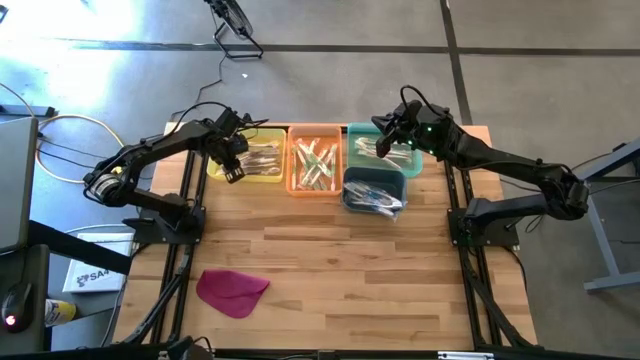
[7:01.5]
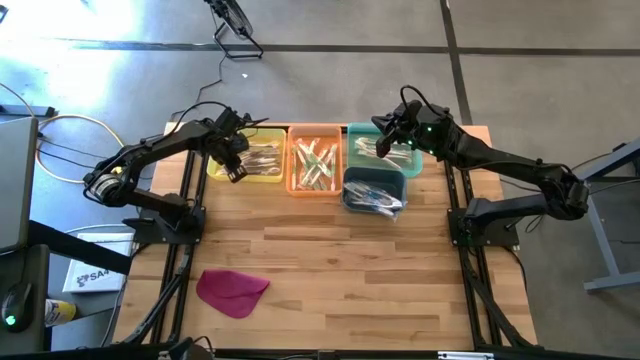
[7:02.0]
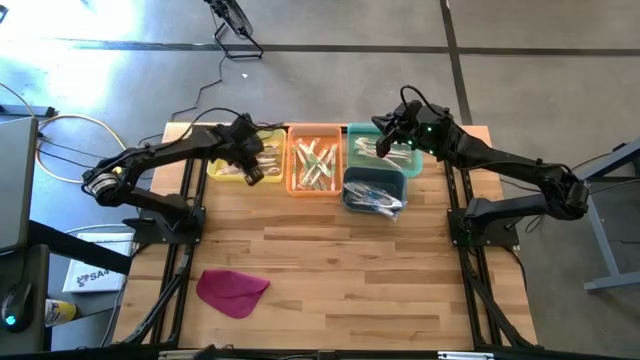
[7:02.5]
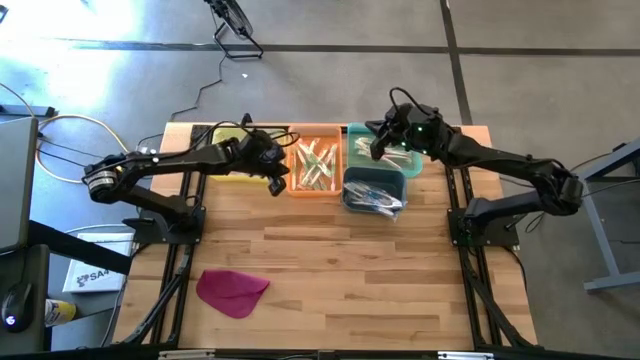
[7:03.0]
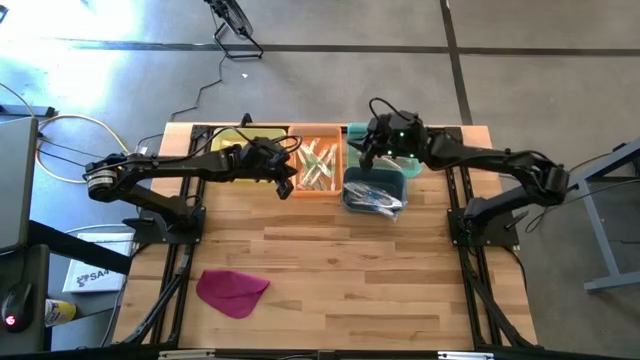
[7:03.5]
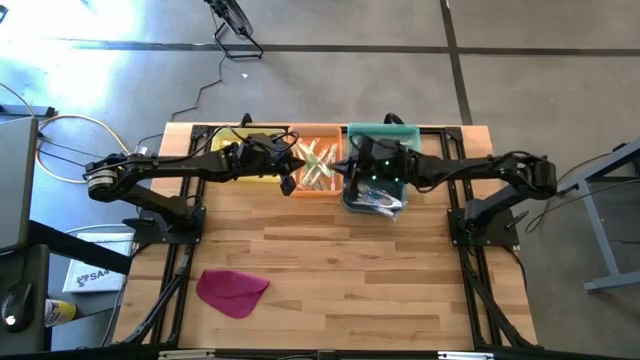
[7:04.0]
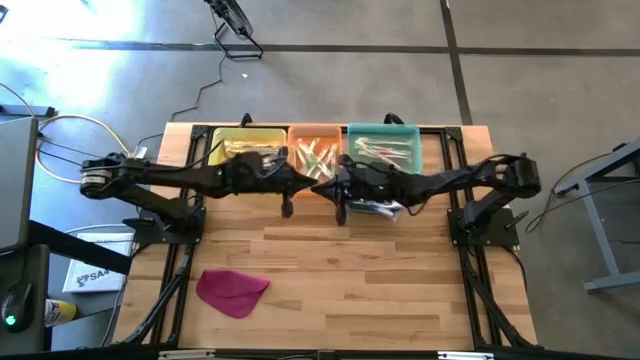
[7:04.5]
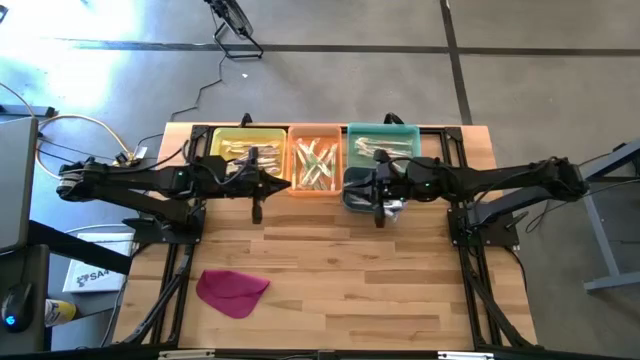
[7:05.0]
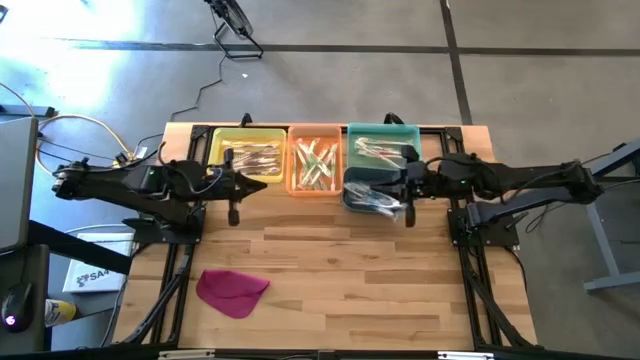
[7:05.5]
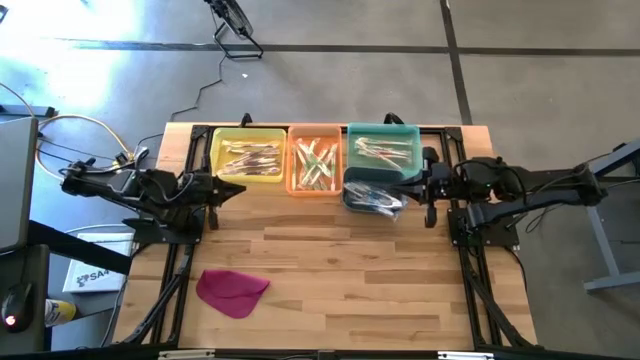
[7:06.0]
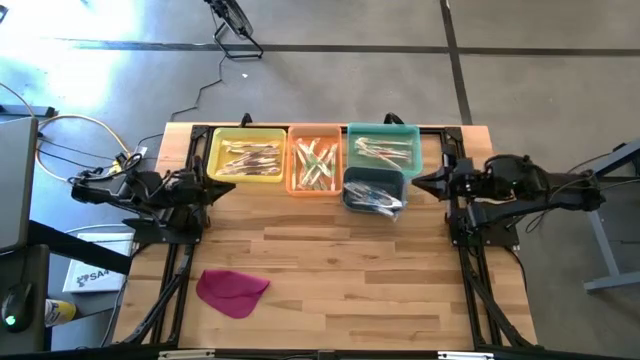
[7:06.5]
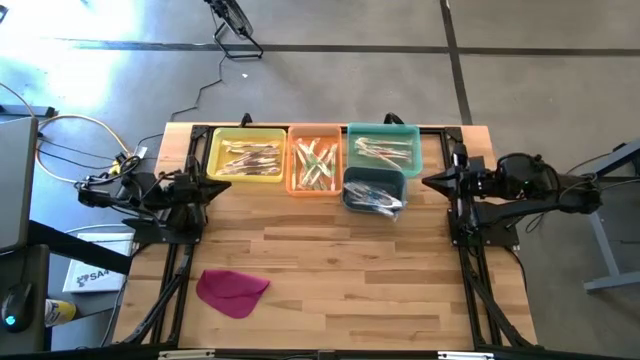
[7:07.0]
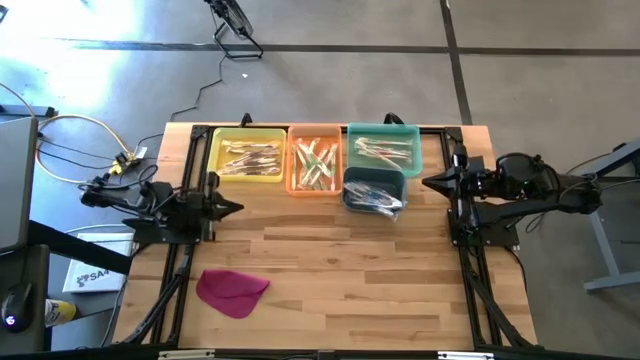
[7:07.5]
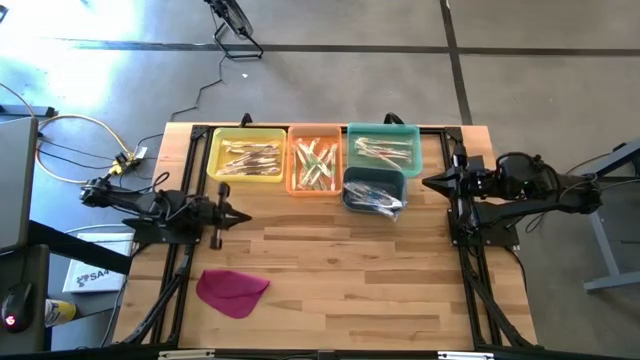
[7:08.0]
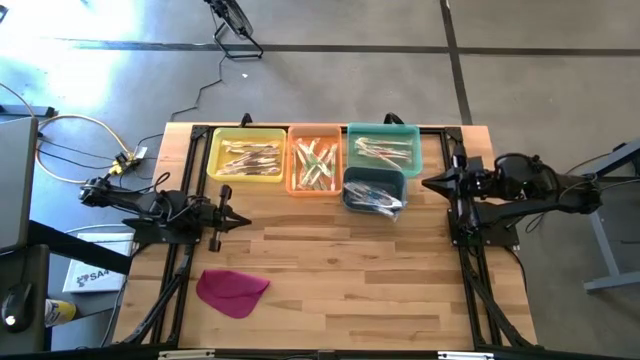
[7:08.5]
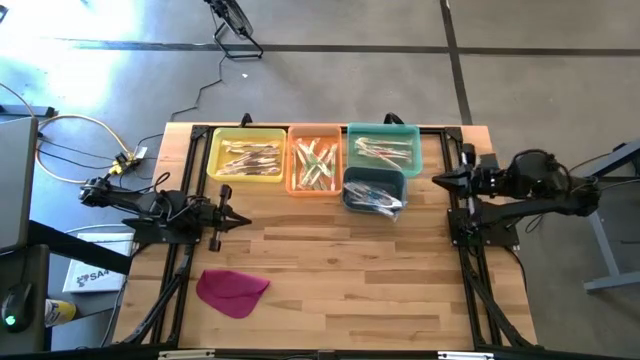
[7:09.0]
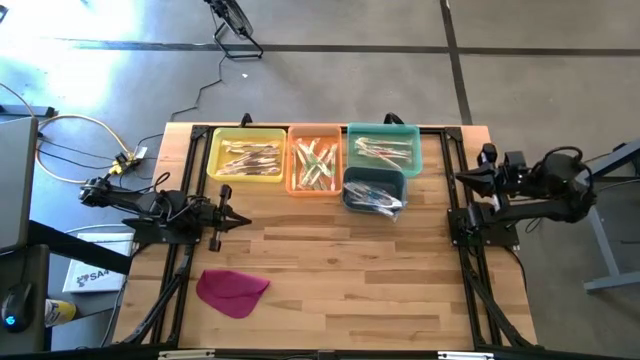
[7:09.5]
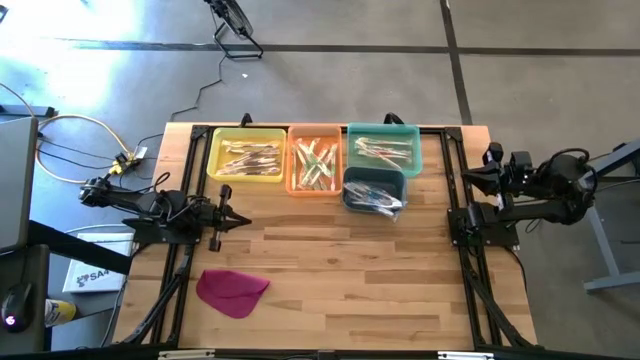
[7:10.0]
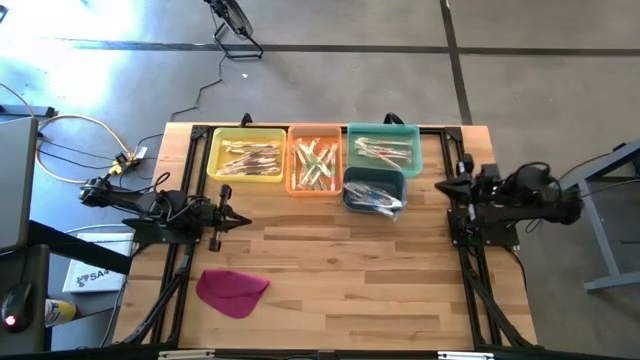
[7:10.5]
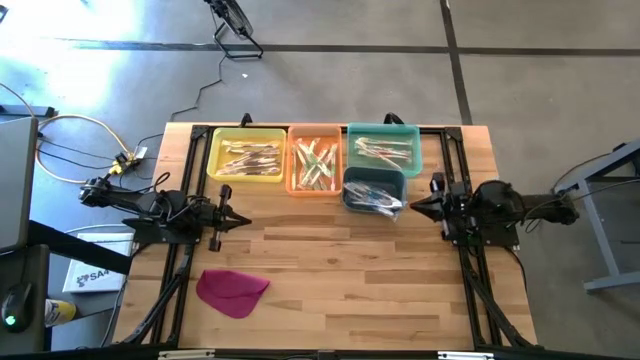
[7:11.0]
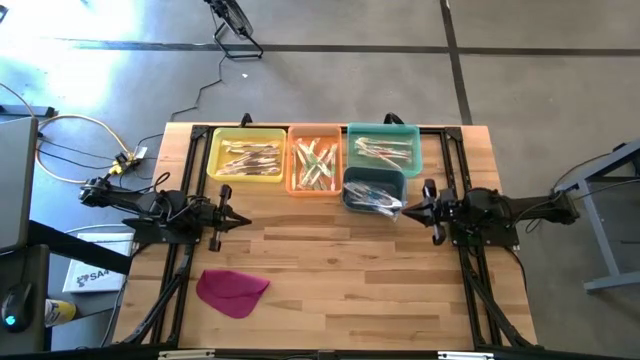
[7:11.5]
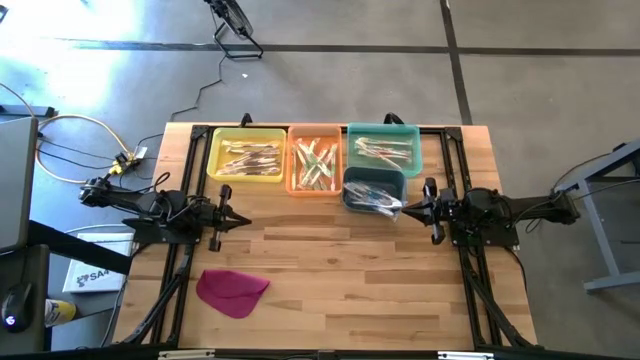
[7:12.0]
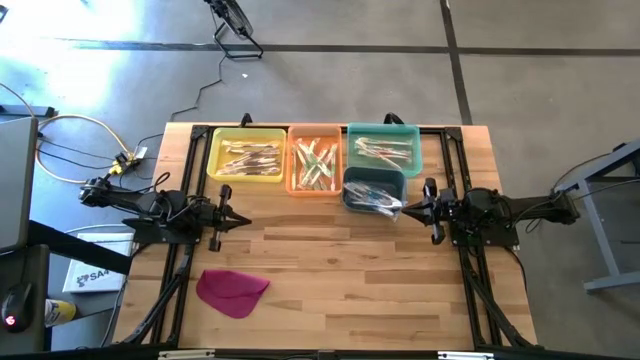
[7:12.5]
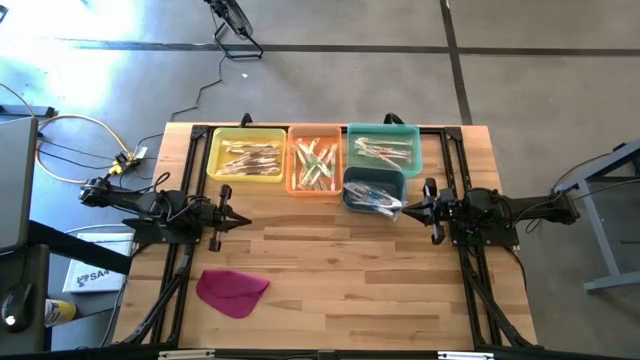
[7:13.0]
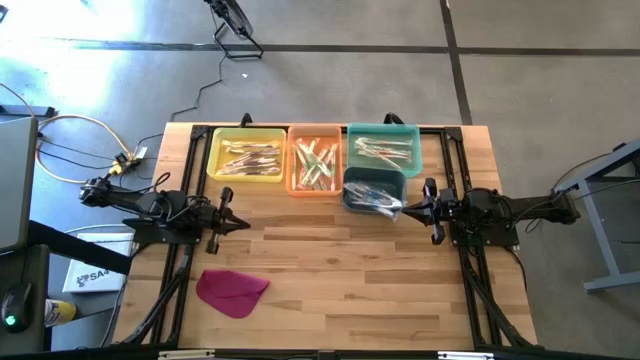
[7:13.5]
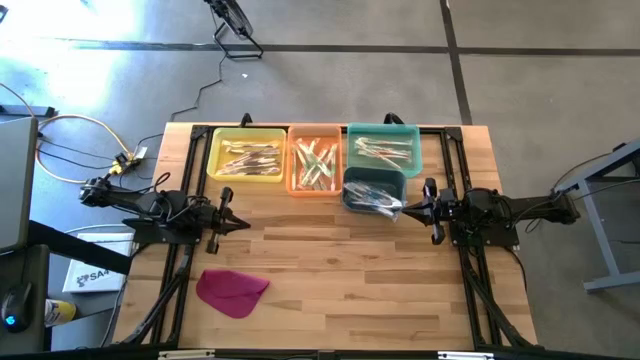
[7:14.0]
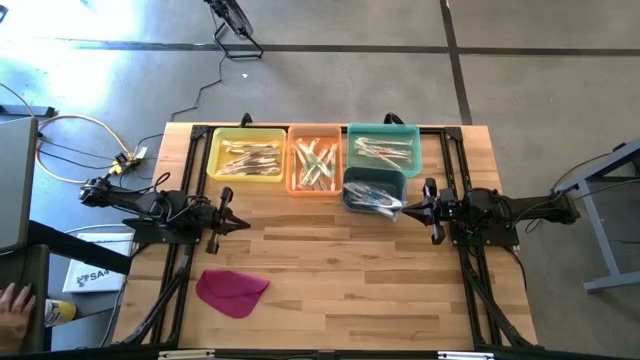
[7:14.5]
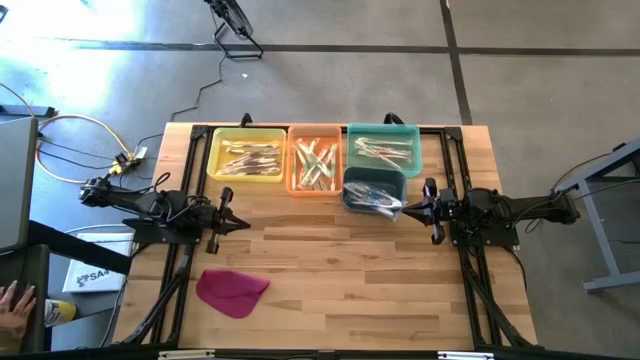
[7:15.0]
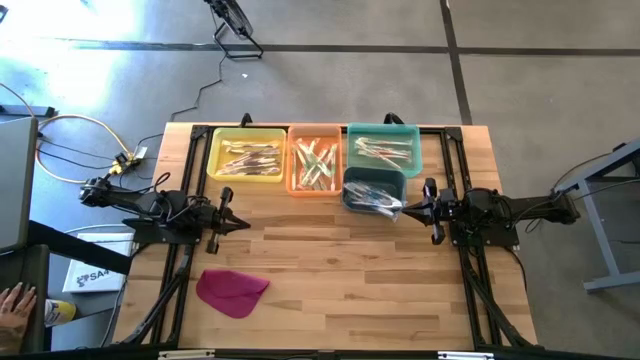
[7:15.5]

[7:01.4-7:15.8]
Task: Pick & Place Toothbrushes
Return to Home Position

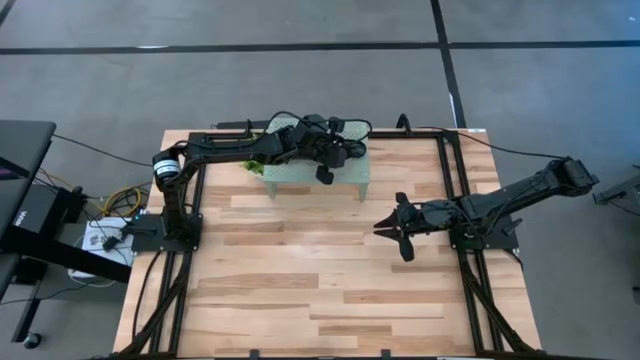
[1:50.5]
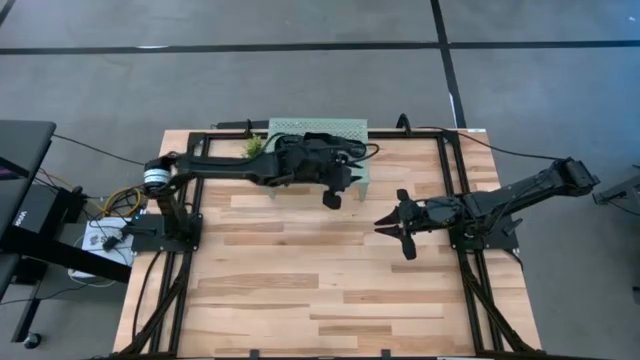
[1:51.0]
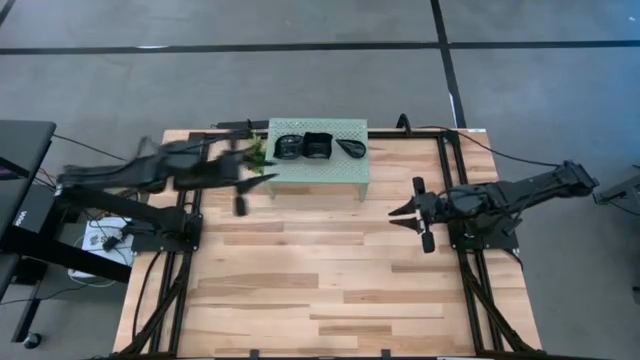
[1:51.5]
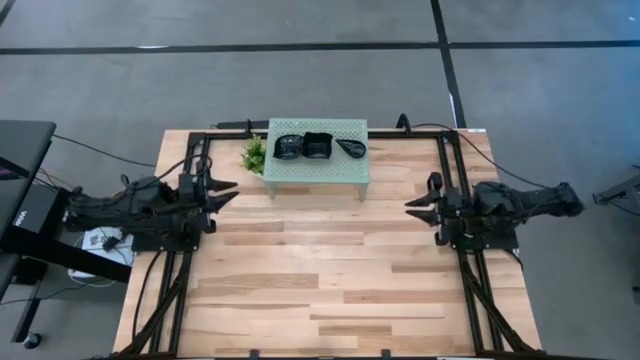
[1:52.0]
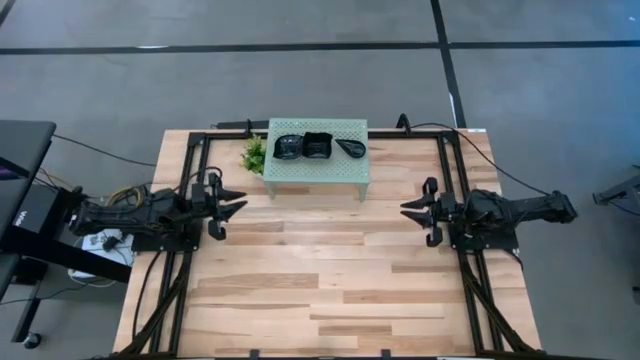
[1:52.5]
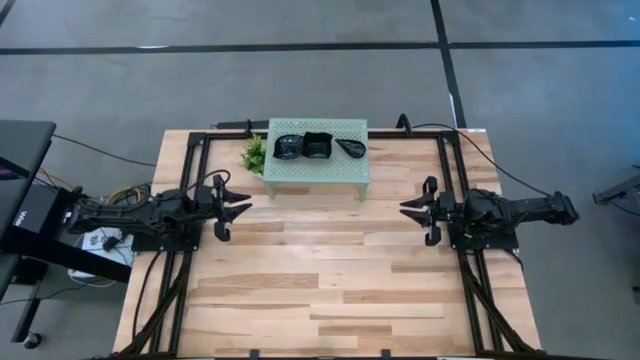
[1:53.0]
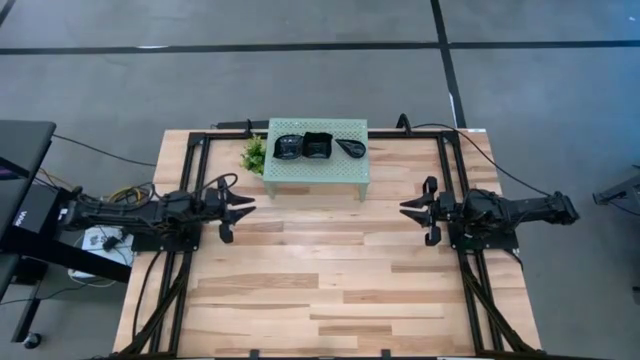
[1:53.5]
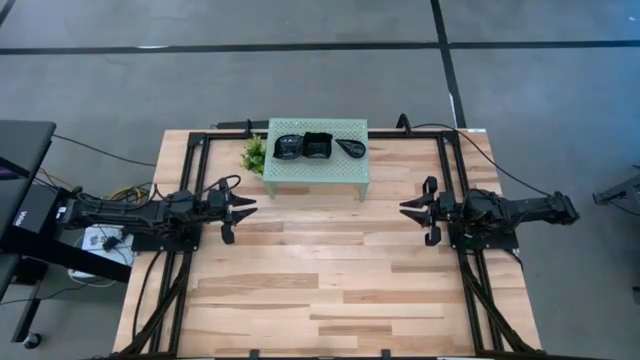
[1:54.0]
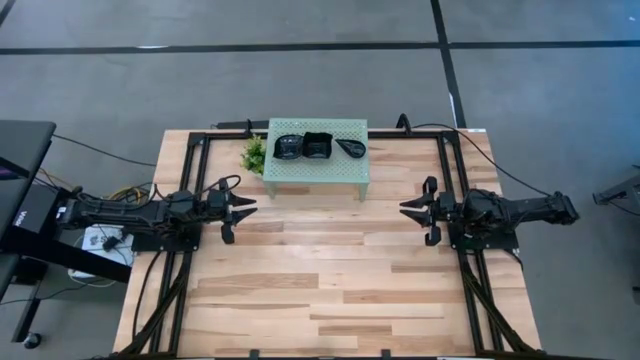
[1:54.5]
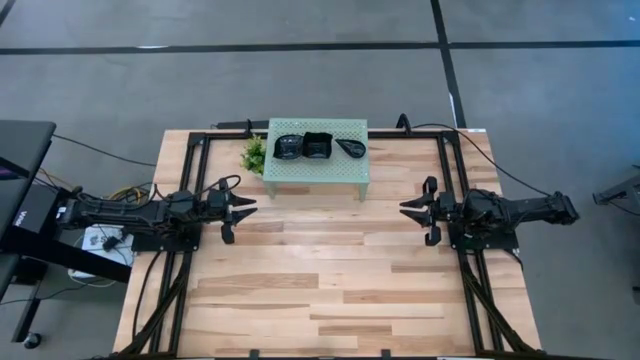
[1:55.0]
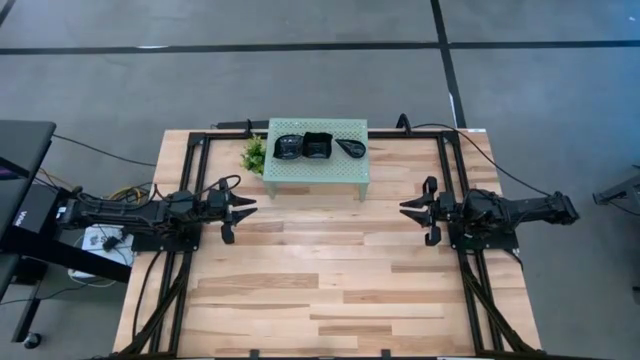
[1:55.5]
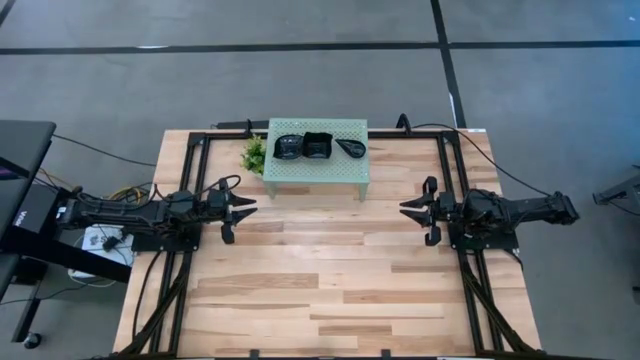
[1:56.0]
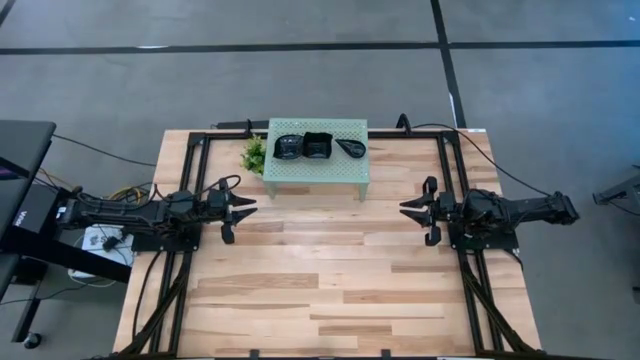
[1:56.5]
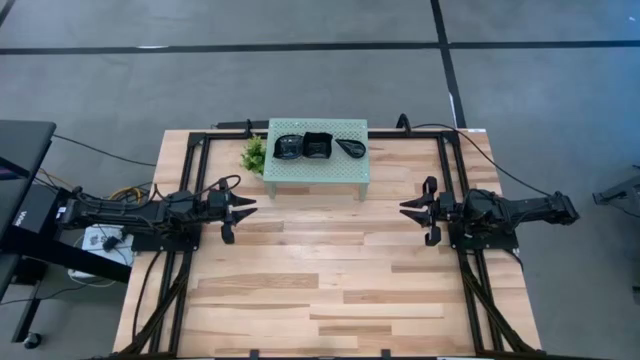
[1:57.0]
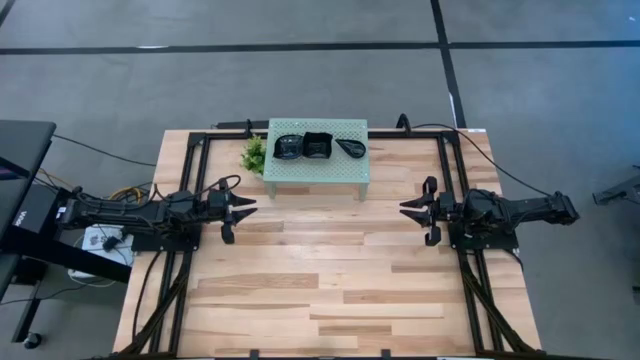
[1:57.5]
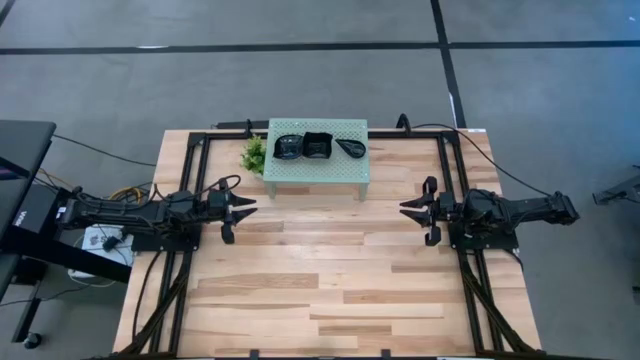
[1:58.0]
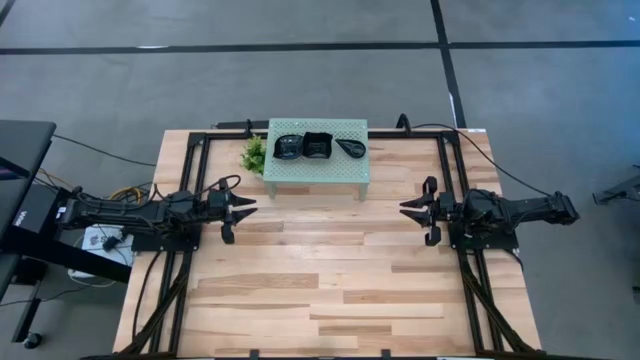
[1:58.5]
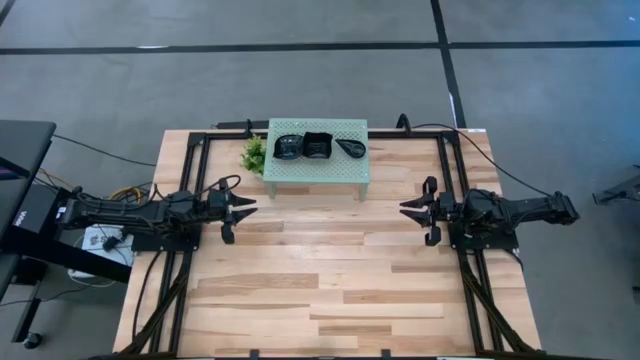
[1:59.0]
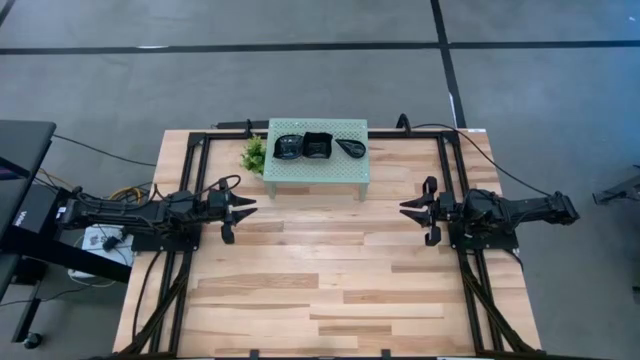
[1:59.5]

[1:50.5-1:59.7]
Task: Pick & Place Mini shaped plates
Return to Home Position
